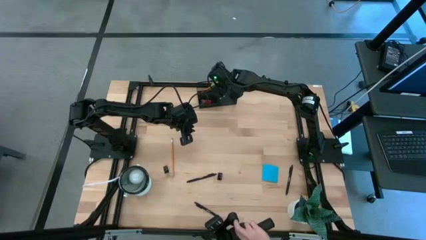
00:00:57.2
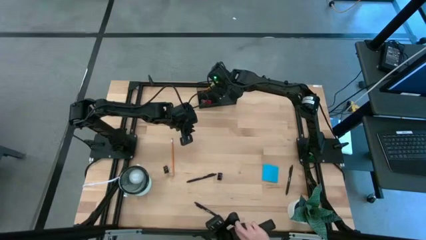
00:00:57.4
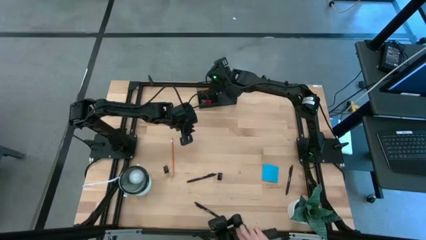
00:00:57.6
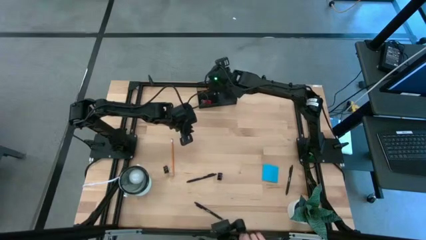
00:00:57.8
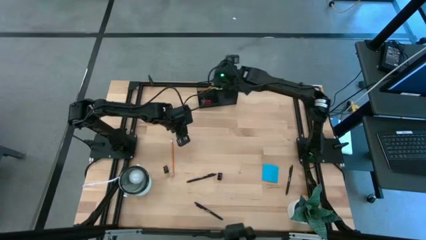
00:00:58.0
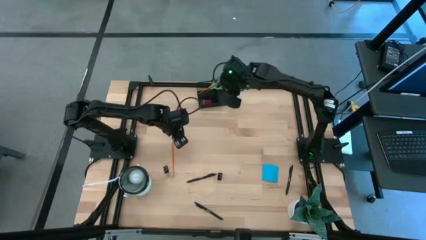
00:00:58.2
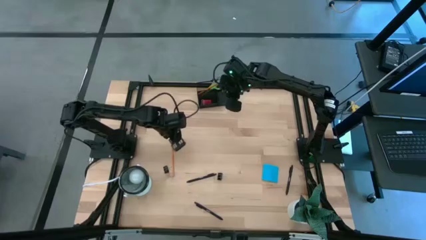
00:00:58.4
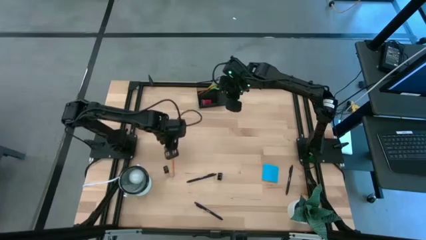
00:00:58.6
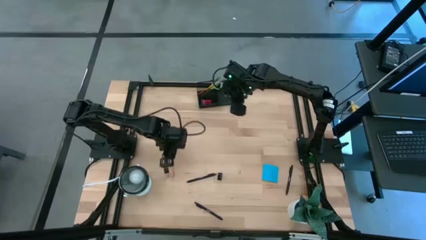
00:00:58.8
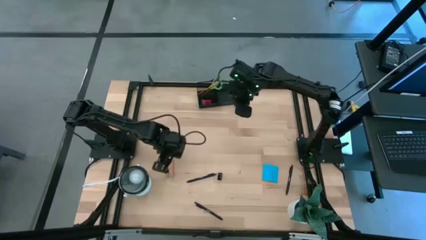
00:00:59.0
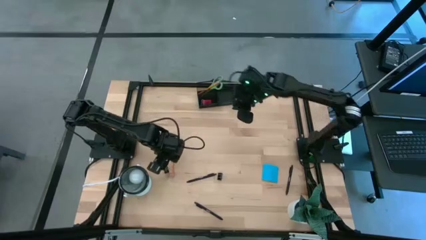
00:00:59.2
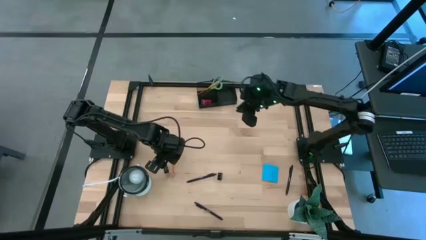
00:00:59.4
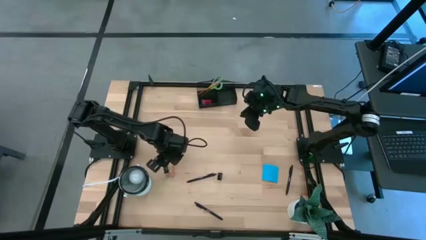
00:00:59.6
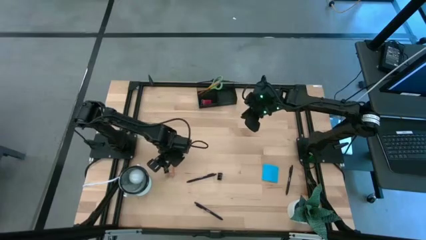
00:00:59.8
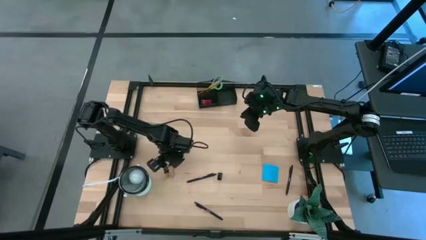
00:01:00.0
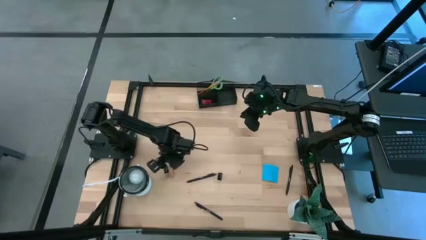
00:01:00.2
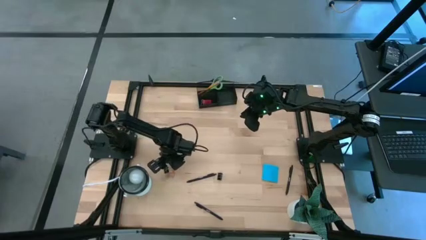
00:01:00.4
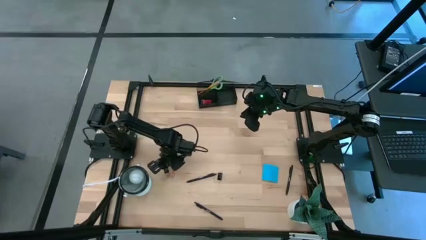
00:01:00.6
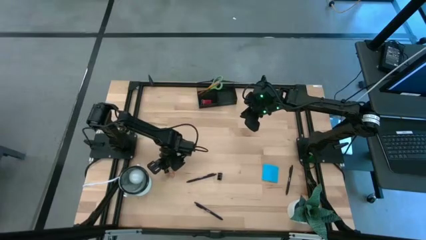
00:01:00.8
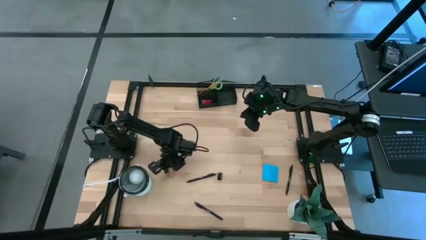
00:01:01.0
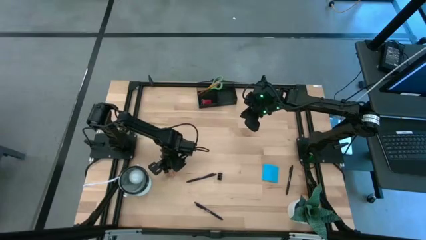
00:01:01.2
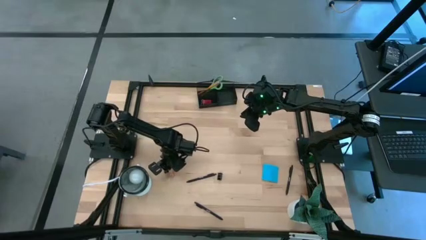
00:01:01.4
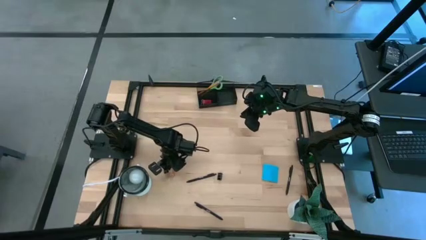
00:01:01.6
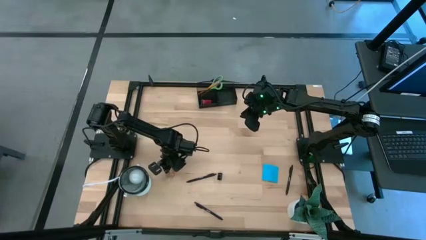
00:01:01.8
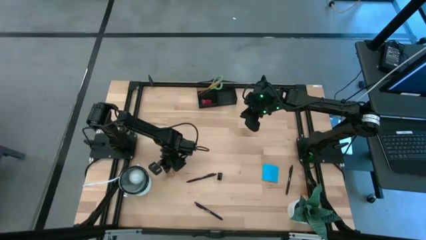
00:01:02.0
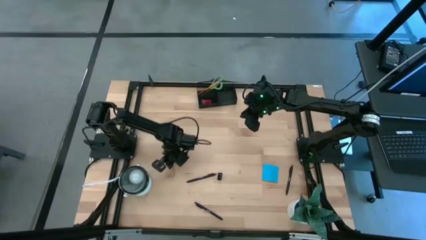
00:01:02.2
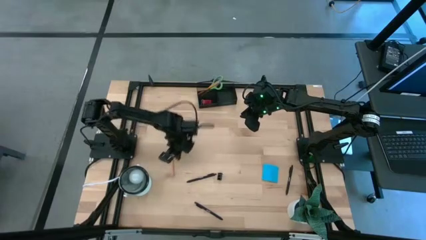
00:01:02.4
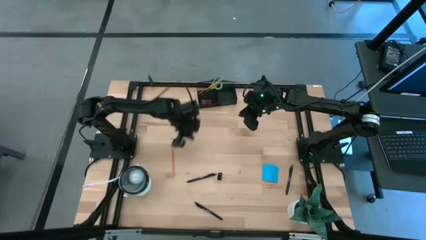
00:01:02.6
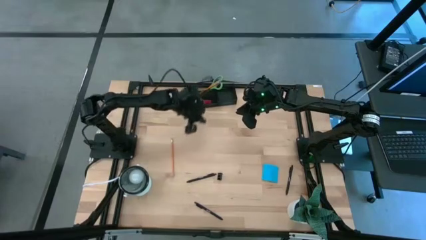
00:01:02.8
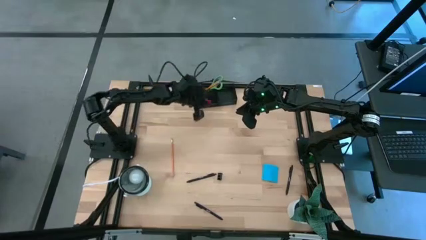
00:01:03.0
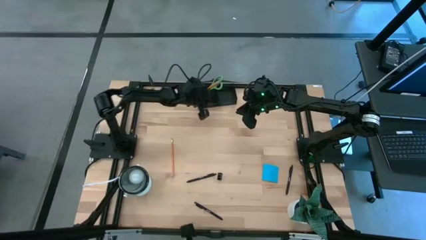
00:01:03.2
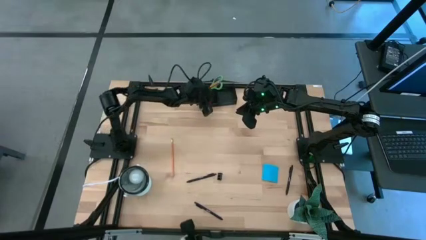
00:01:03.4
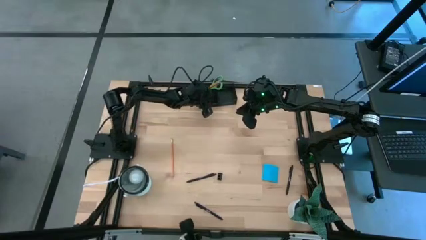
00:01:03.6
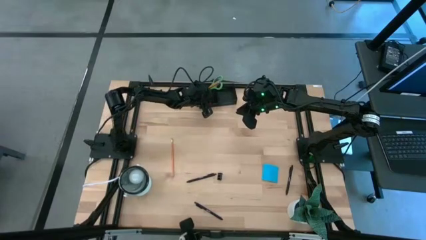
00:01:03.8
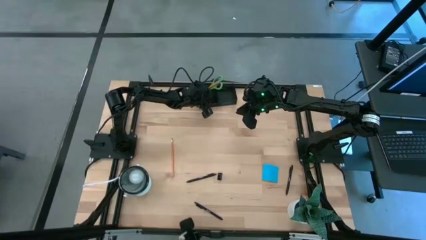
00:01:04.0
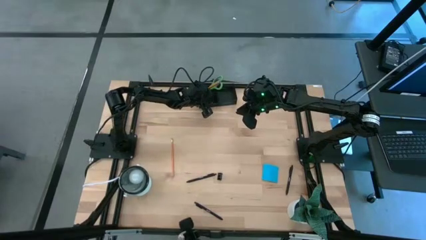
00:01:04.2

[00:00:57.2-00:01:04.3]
Task: Pick and place office supplies into organizer
Put the left black binder clip into the desk organizer

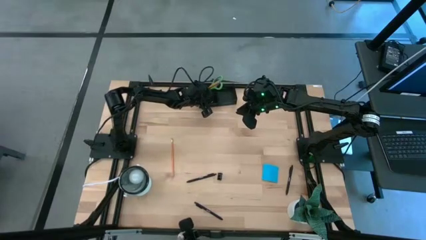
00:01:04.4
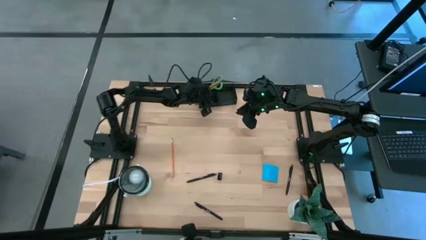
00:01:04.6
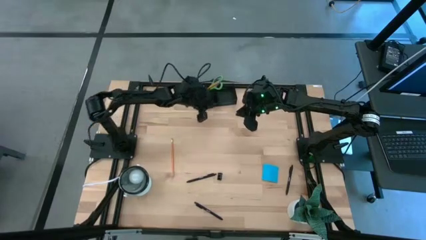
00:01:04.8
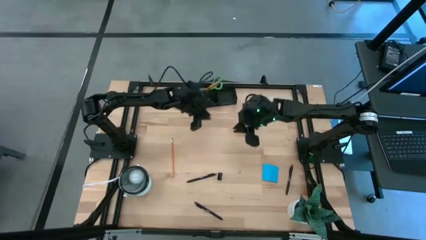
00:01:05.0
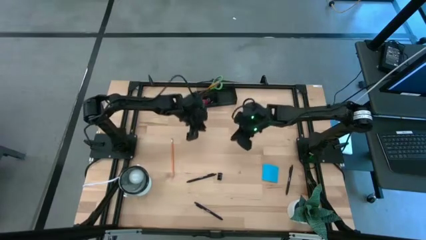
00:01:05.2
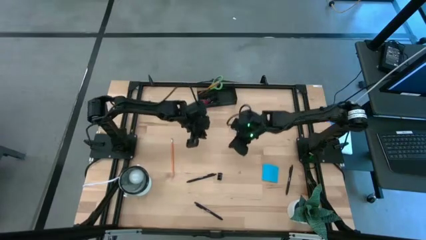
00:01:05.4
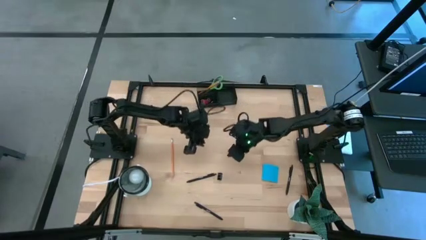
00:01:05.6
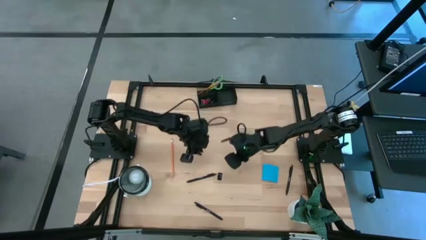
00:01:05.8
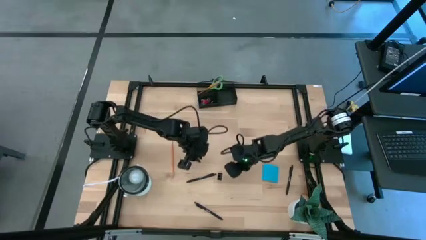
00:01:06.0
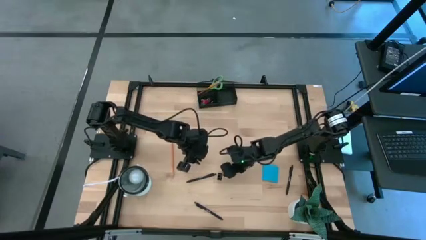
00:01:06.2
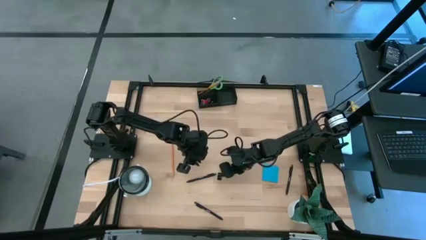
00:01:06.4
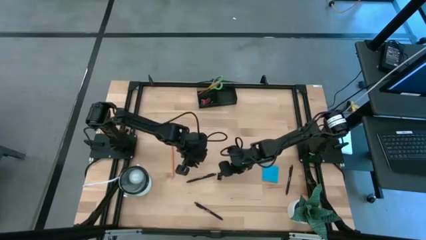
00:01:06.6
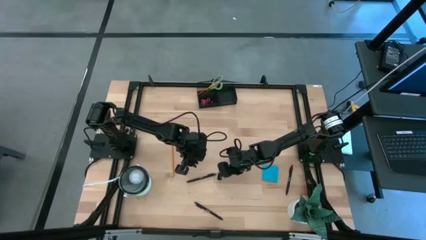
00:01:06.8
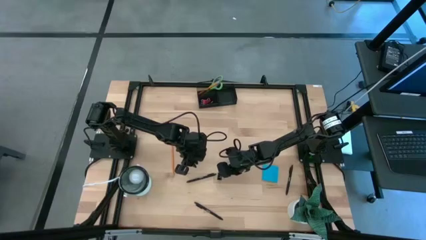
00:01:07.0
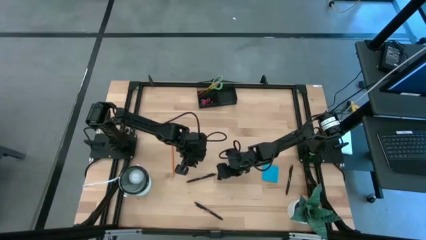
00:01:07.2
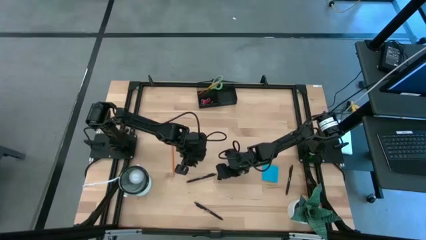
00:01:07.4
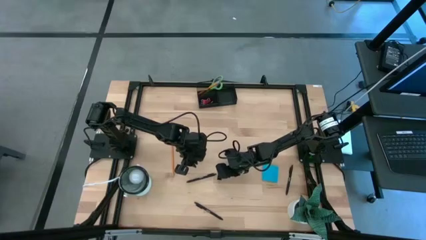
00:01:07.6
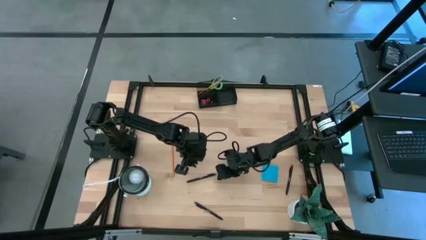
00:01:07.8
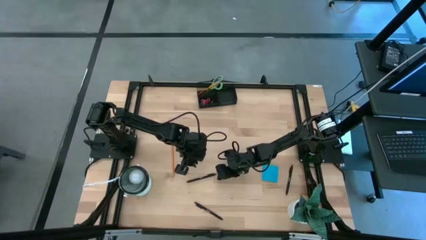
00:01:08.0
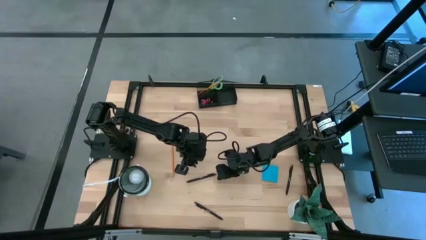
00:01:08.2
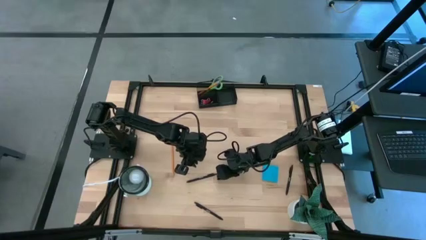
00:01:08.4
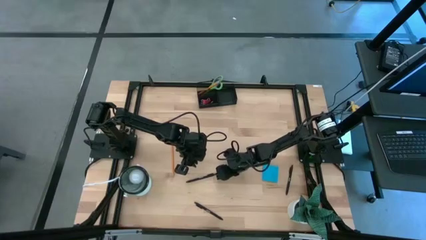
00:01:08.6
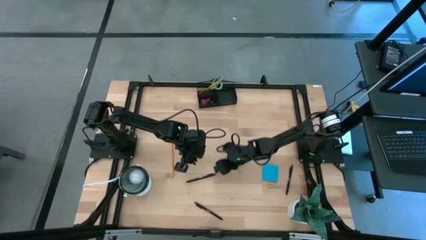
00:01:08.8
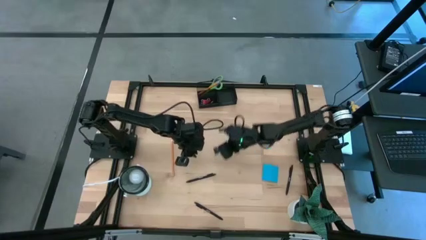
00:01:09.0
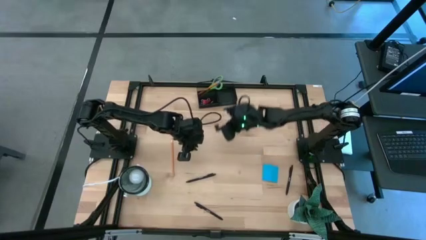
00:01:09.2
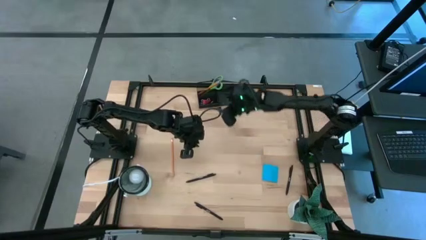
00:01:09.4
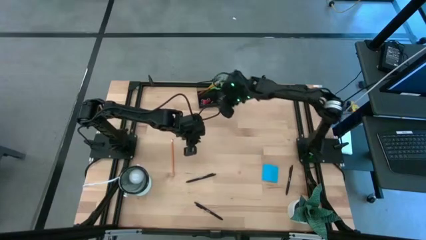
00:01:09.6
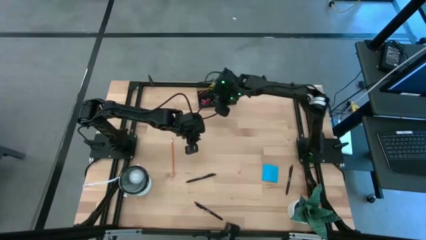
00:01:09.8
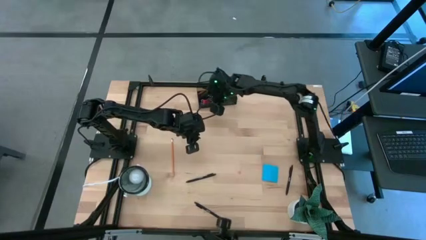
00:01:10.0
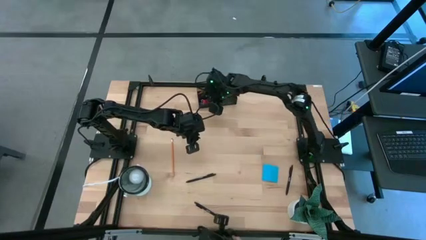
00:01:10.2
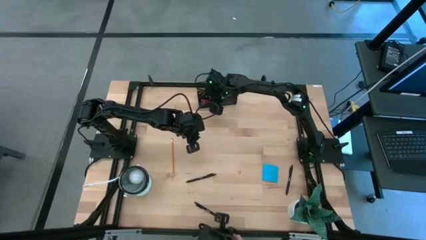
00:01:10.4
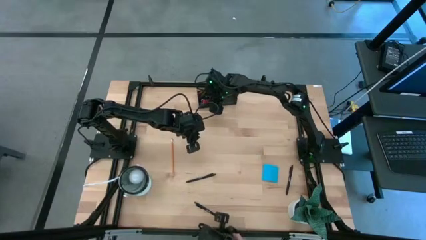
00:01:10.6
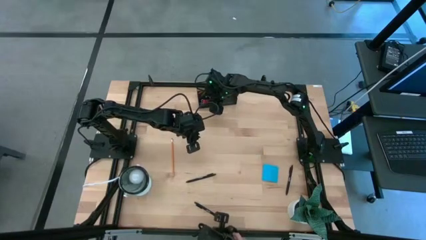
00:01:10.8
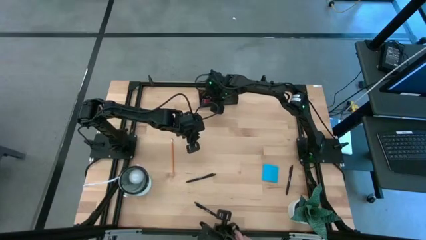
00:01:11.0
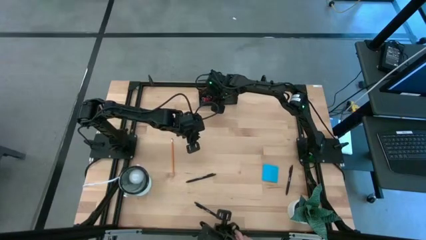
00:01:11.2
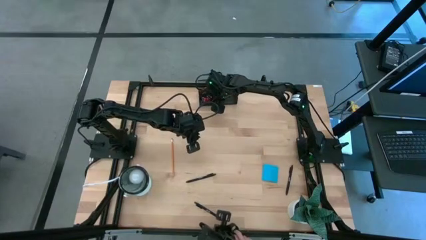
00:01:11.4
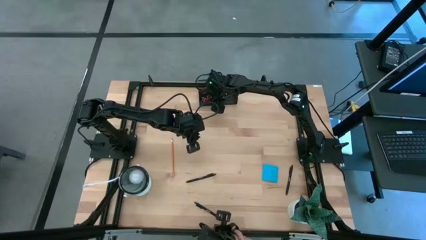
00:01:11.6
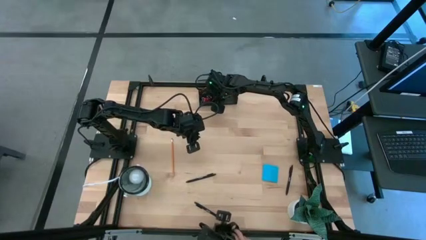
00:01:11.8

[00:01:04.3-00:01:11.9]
Put the black binder clip into the desk organizer
